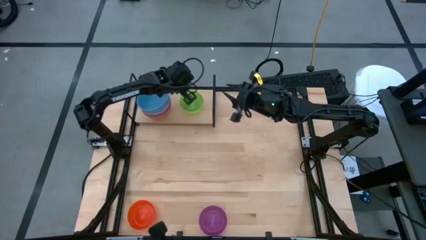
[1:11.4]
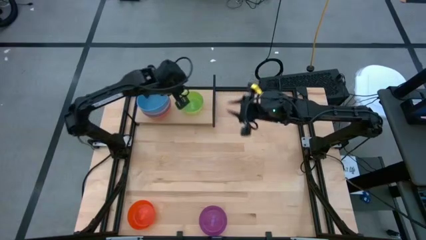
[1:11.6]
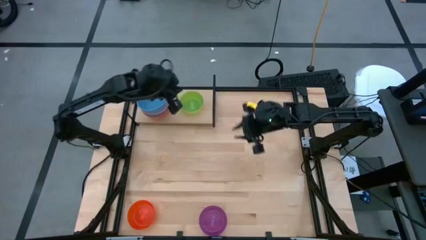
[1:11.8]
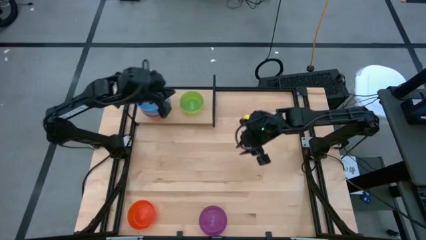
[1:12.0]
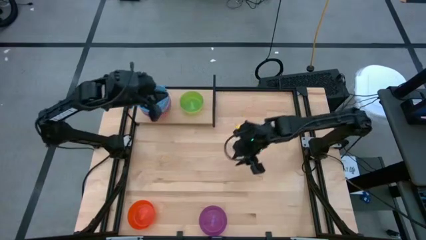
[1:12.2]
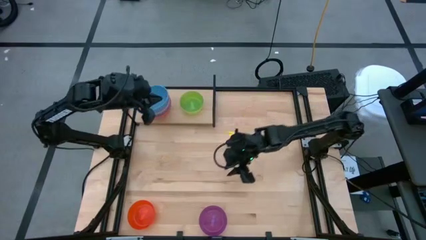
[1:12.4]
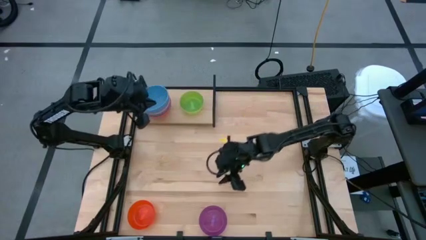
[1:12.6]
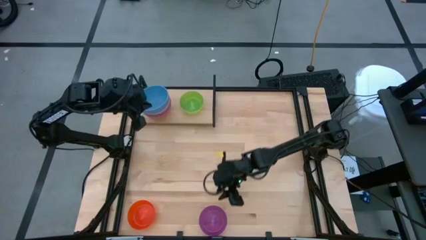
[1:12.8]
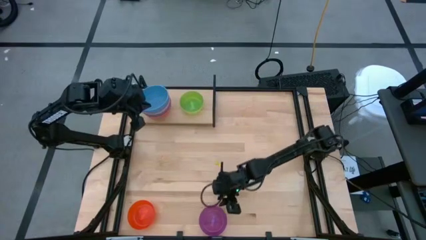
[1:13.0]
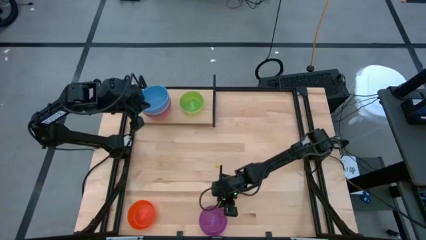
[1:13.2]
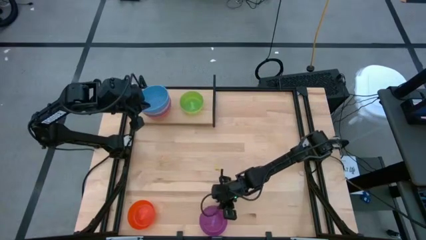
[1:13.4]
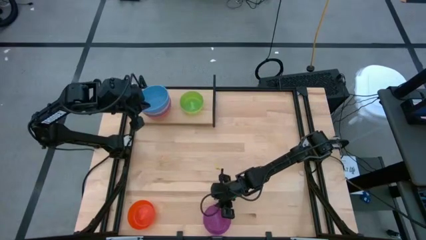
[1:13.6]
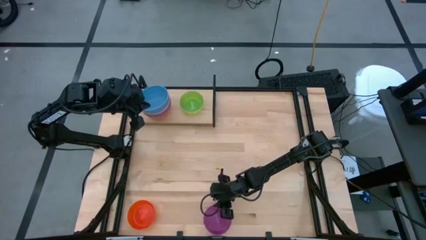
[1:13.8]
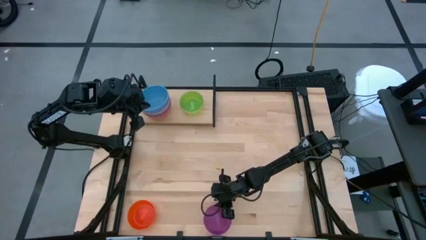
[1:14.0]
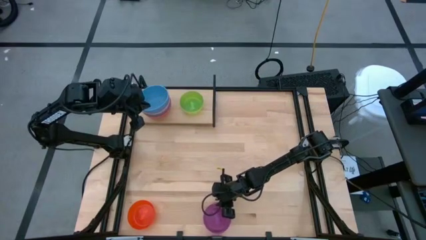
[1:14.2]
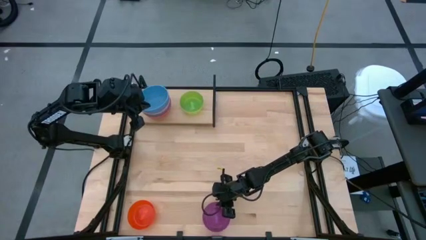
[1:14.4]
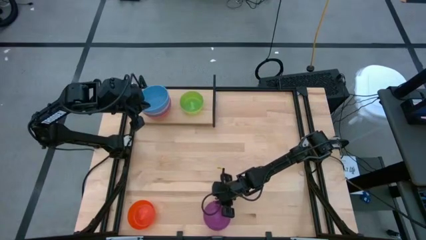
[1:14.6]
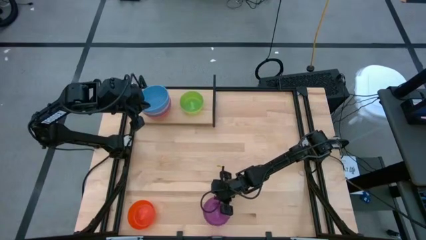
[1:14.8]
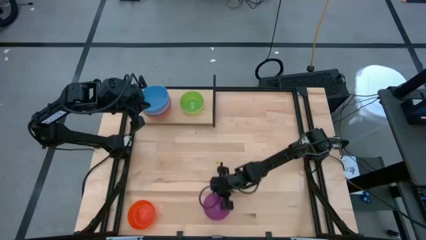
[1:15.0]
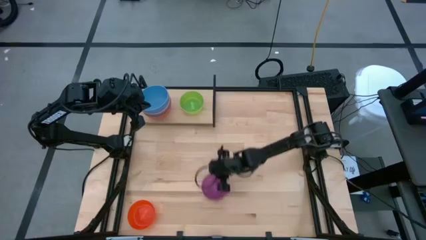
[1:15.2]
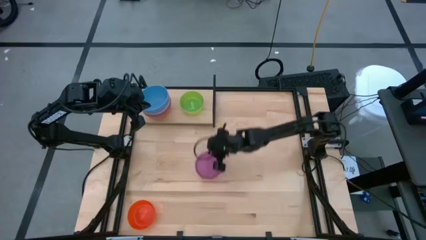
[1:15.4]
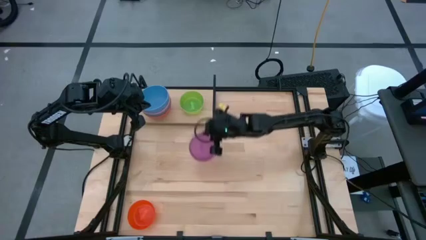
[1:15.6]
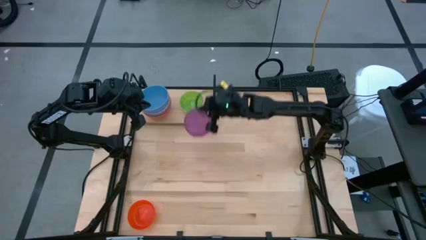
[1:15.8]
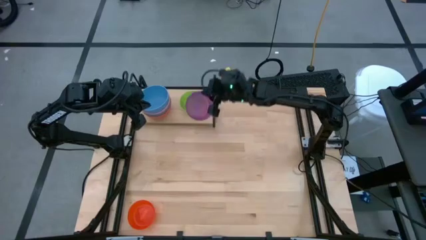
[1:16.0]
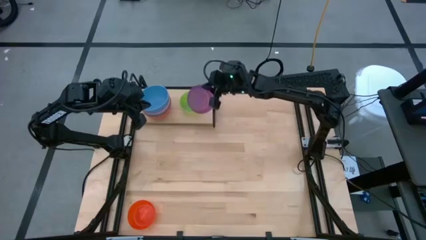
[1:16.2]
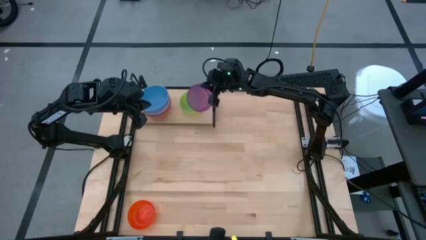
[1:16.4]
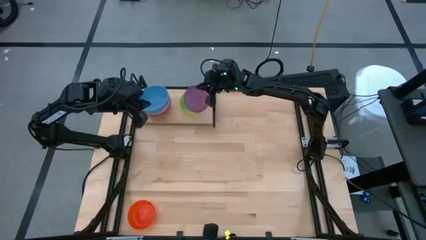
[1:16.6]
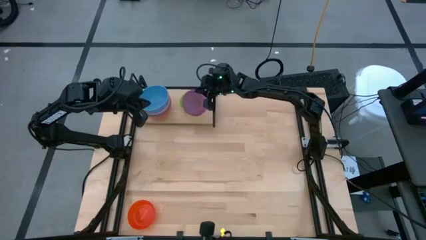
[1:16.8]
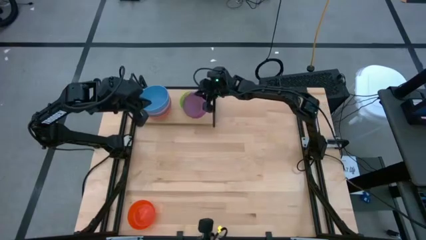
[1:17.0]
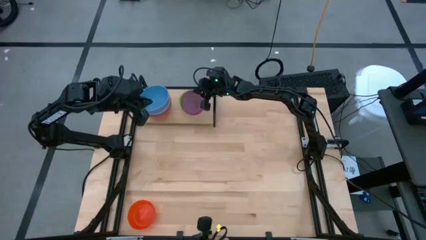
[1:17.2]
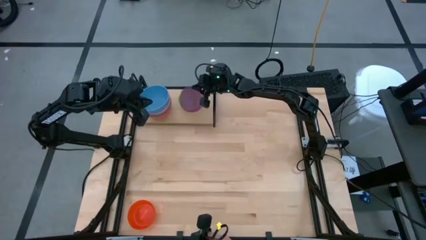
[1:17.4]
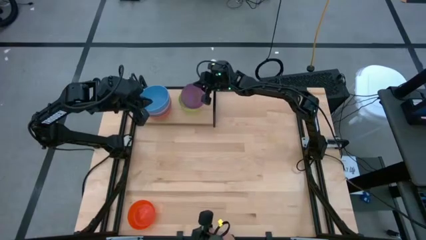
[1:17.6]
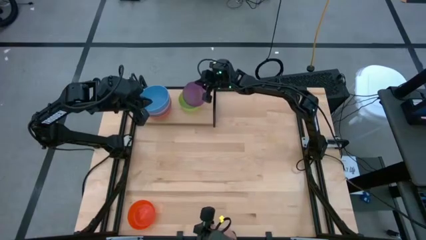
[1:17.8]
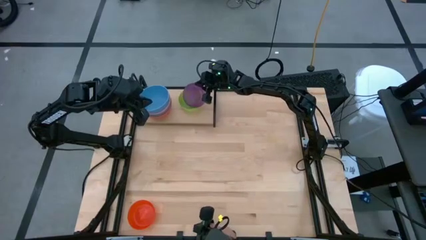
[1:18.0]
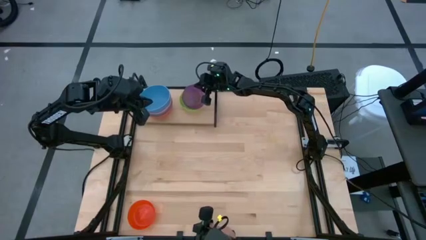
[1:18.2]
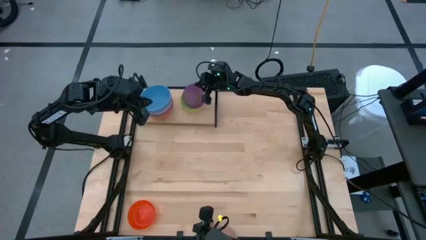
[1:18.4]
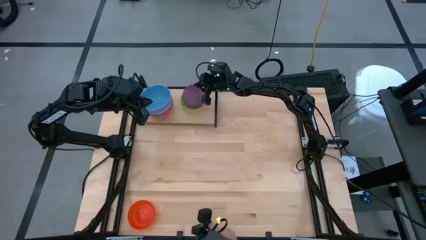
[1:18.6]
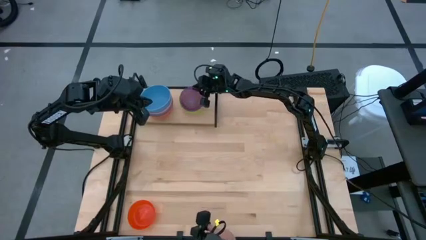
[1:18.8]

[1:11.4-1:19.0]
Task: Place and stack bowls onto a shelf
Stack the transparent violet bowl on top of the transparent green bowl on the shelf

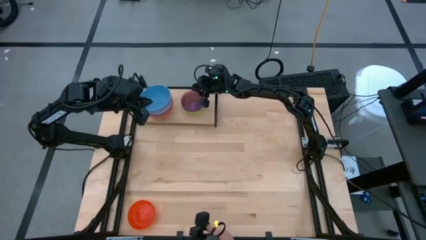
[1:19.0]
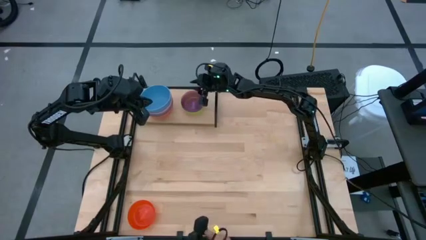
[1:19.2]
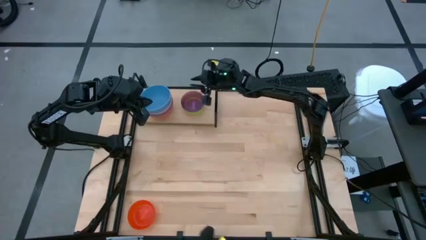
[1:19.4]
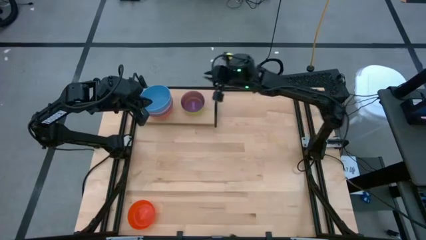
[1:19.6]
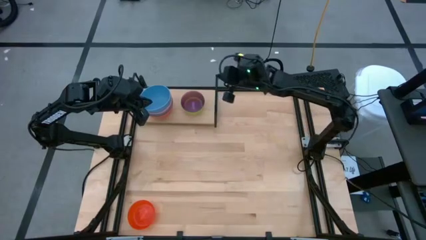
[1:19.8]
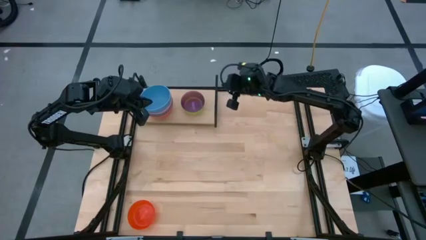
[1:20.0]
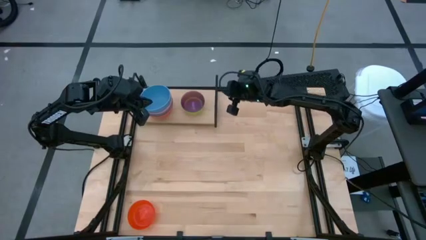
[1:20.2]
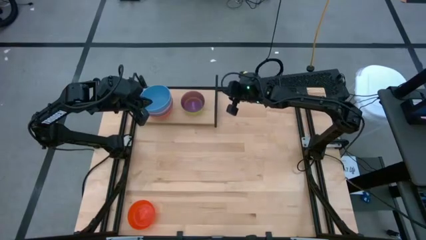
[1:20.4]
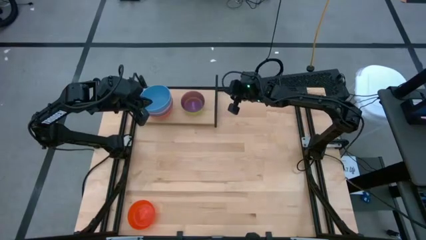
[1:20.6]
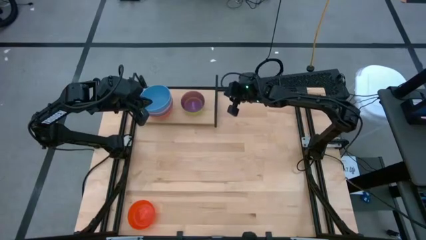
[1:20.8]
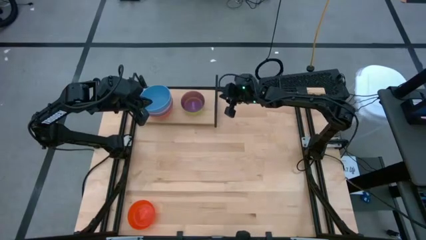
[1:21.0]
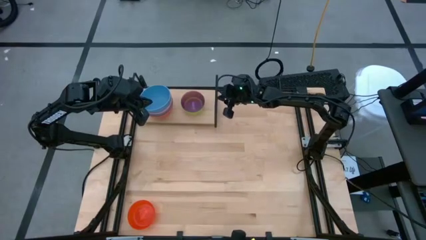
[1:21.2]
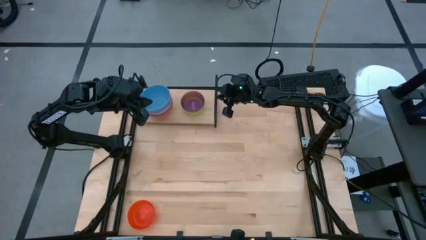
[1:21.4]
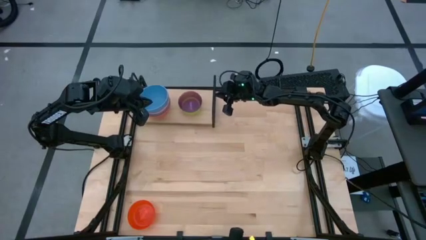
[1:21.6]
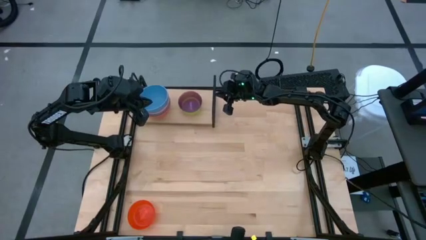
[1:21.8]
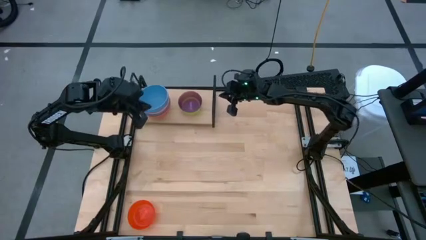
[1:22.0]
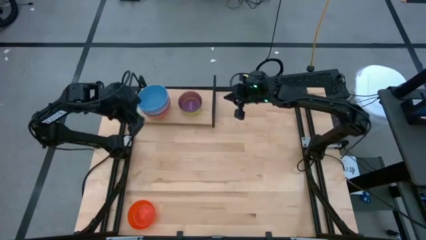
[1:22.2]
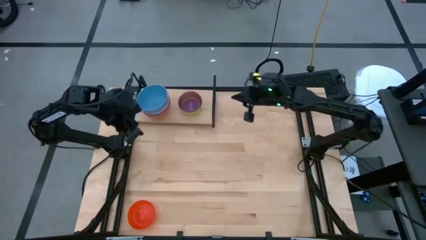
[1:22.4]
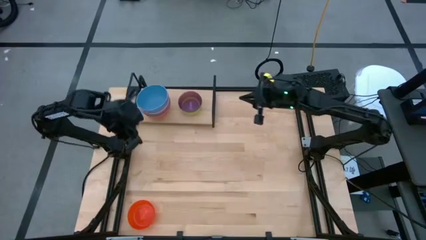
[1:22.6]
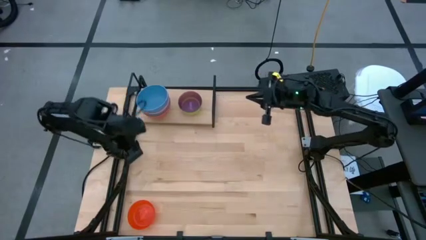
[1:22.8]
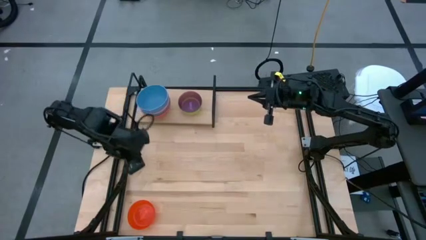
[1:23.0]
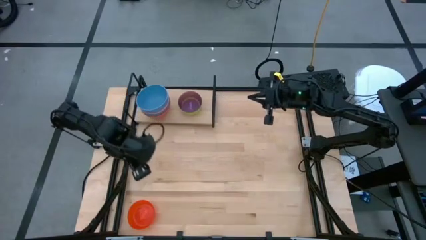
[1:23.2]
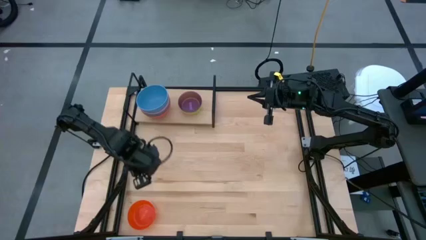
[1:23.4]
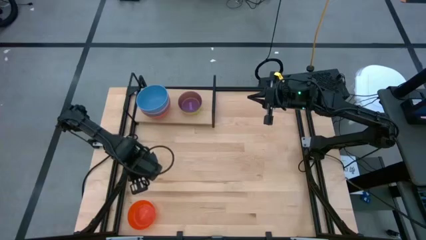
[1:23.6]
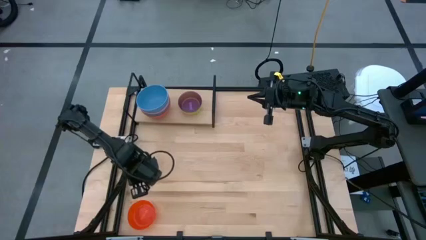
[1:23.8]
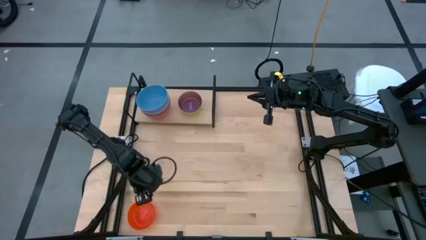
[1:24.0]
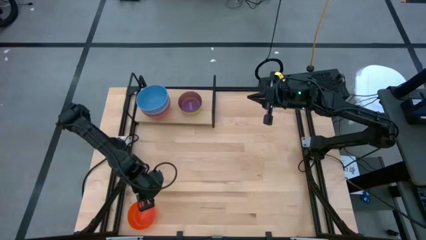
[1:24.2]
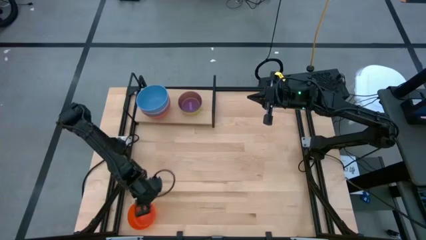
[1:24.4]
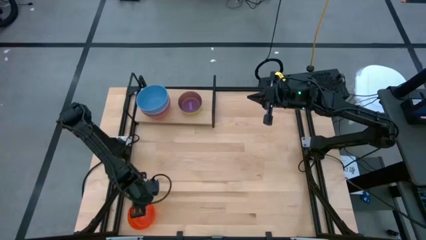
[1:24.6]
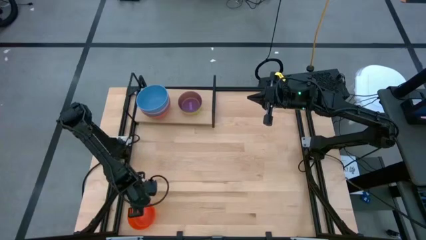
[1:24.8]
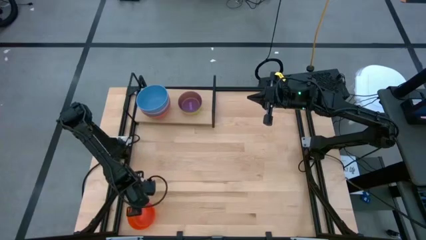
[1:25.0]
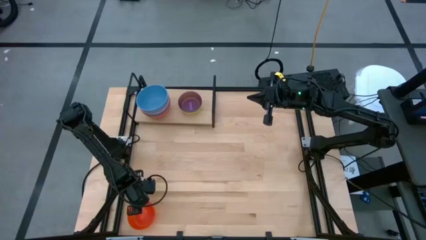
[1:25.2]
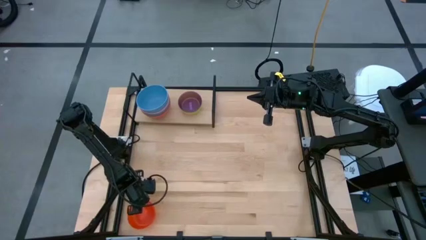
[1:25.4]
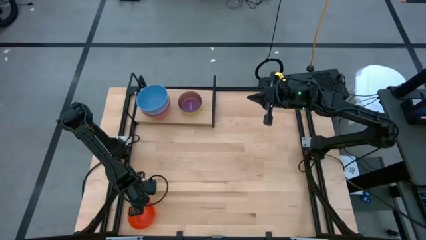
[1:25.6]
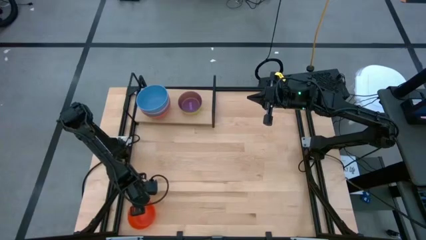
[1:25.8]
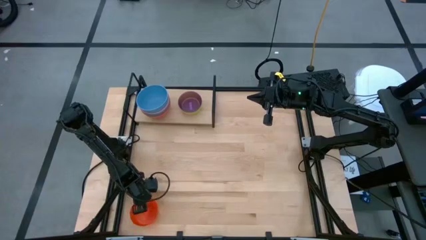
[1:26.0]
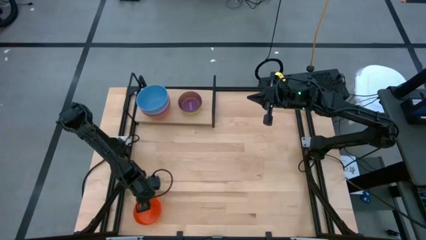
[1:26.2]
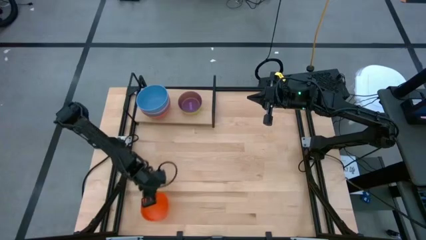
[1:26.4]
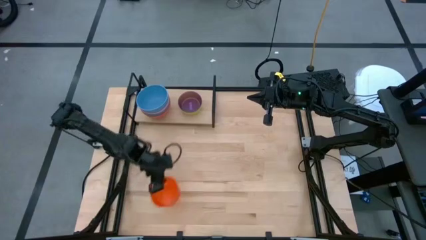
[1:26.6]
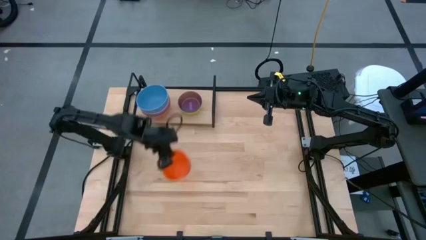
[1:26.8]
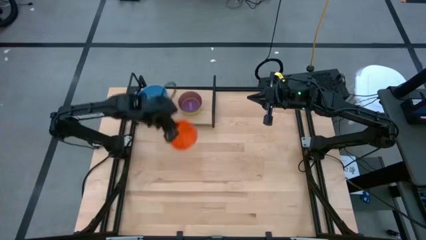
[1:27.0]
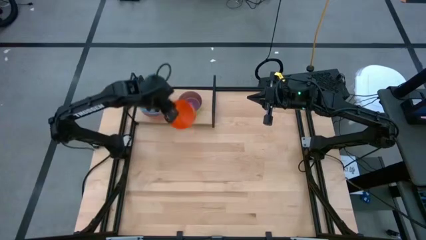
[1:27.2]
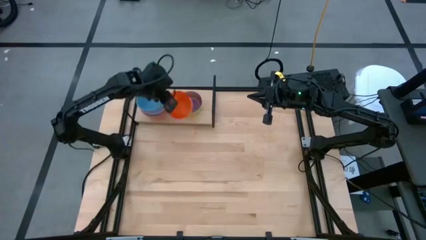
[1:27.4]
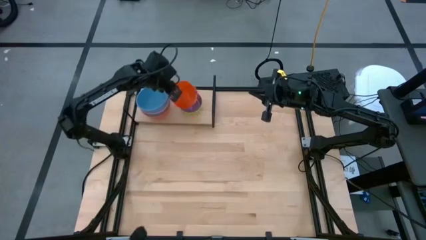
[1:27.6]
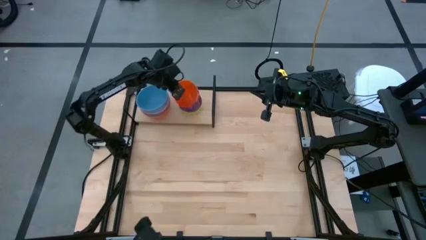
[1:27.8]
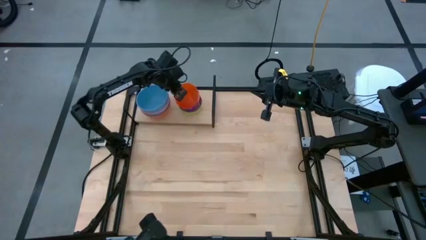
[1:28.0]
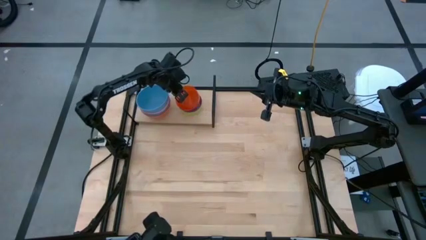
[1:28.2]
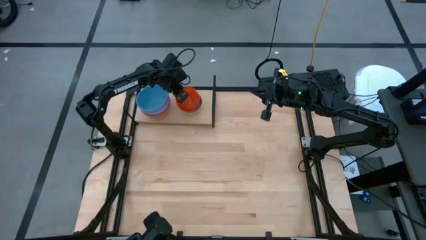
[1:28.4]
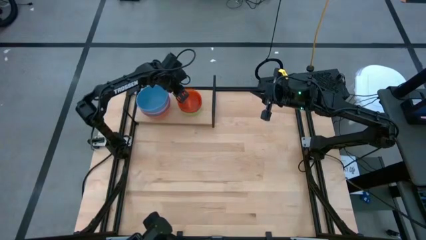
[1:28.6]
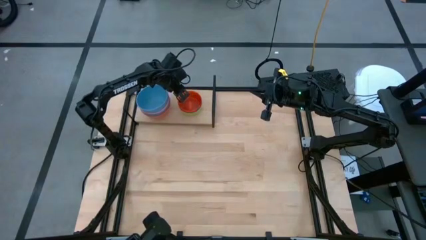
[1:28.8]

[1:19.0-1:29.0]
Stack the transparent orange bowl on top of the transparent violet bowl on the shelf
